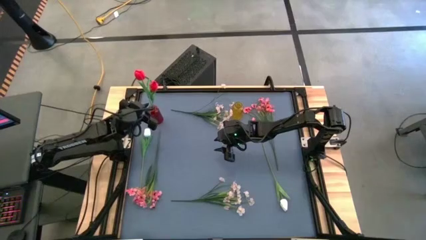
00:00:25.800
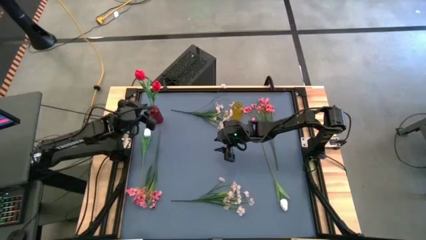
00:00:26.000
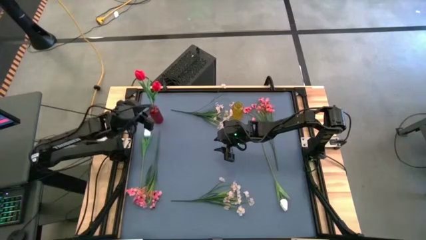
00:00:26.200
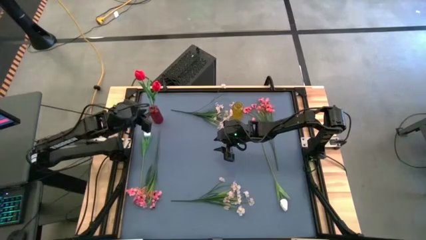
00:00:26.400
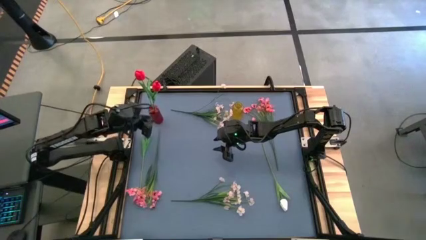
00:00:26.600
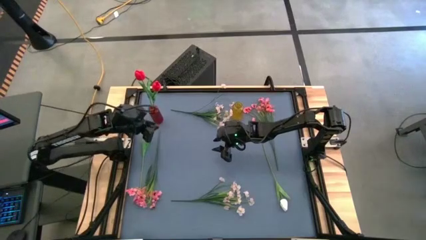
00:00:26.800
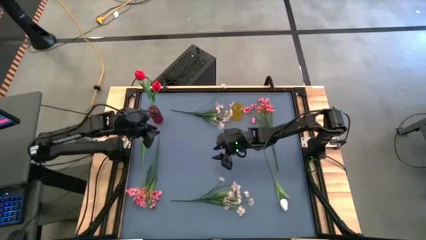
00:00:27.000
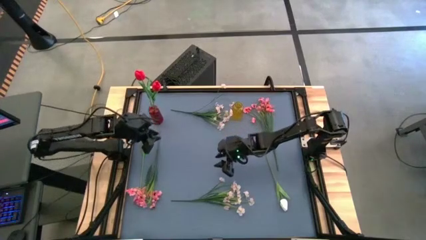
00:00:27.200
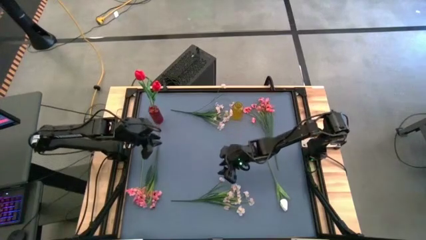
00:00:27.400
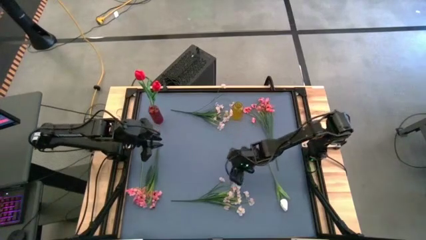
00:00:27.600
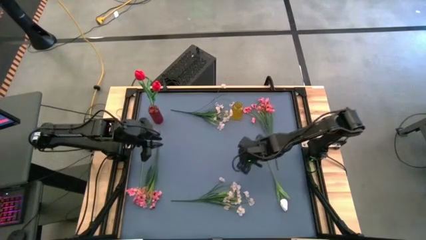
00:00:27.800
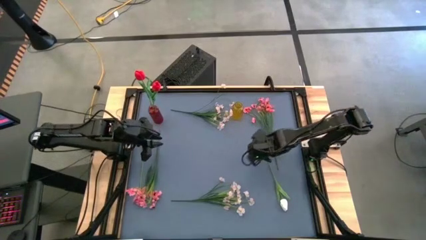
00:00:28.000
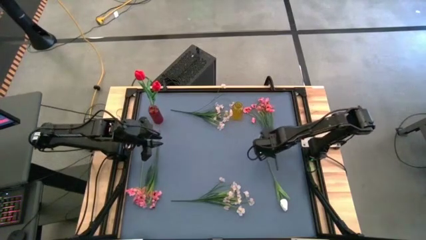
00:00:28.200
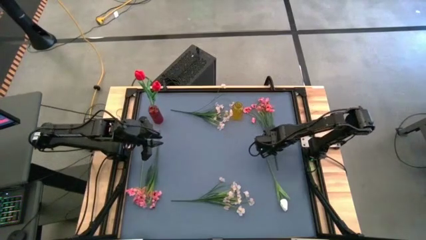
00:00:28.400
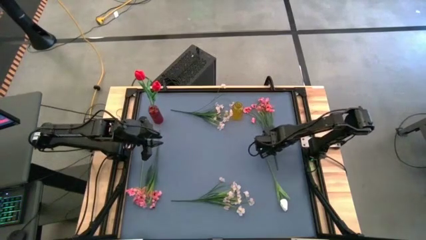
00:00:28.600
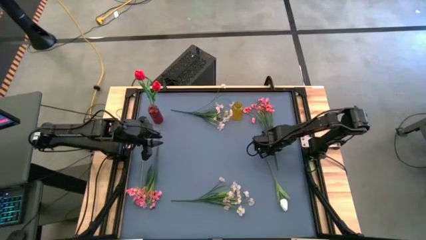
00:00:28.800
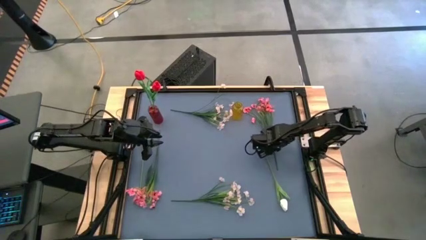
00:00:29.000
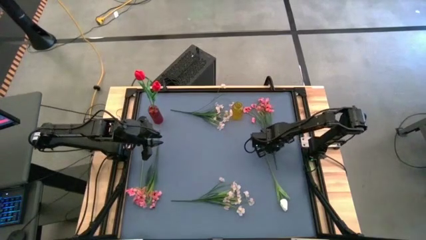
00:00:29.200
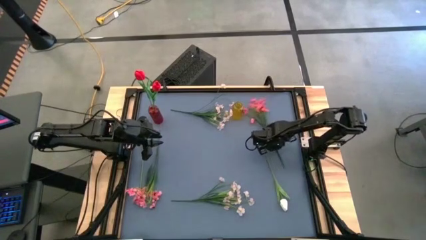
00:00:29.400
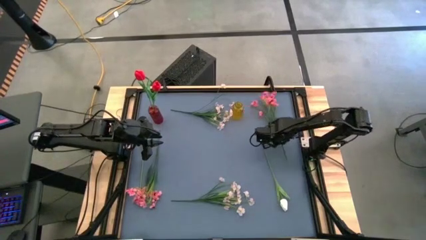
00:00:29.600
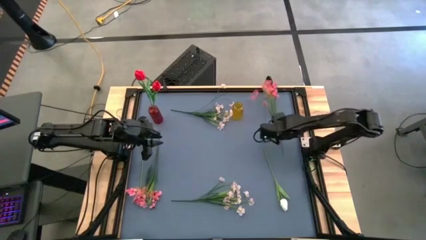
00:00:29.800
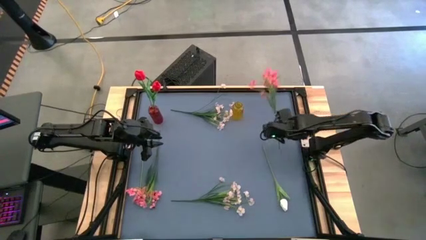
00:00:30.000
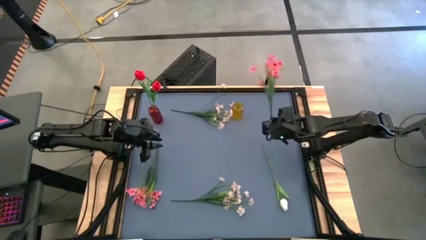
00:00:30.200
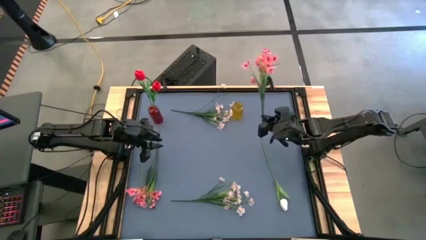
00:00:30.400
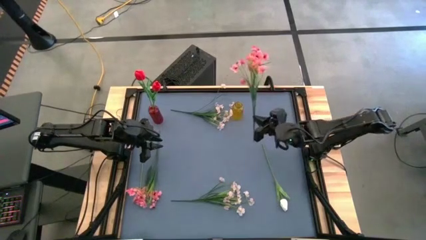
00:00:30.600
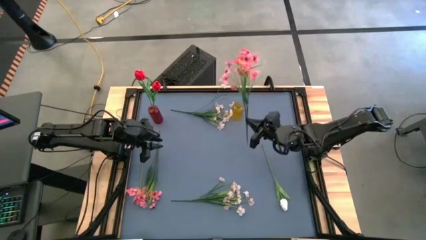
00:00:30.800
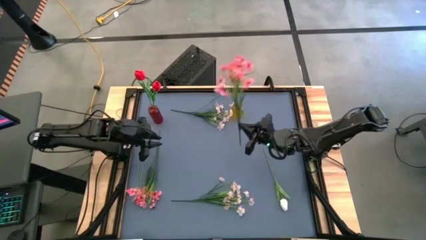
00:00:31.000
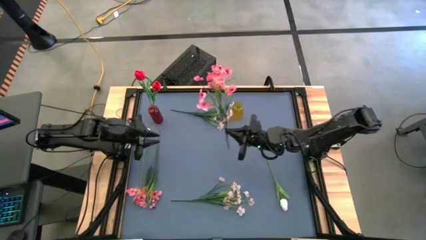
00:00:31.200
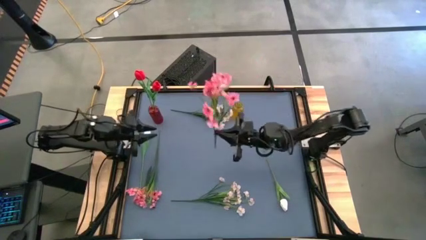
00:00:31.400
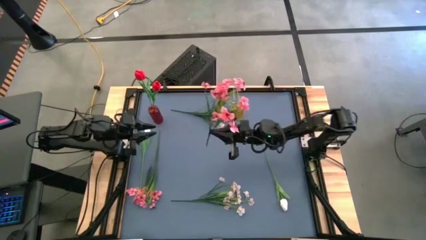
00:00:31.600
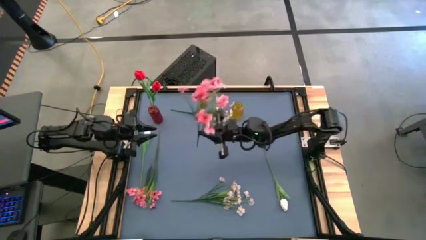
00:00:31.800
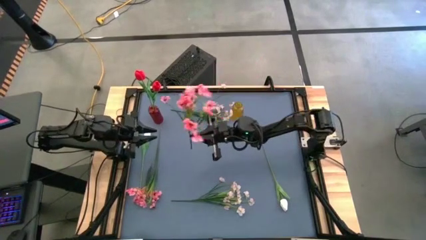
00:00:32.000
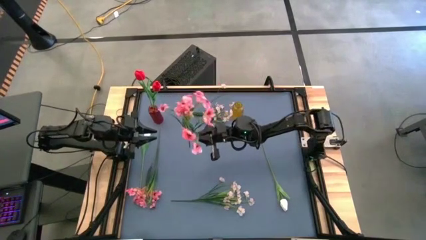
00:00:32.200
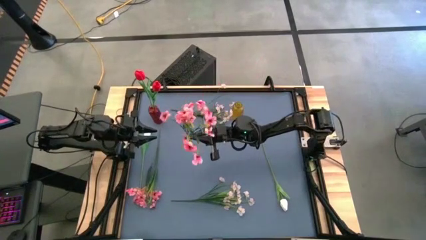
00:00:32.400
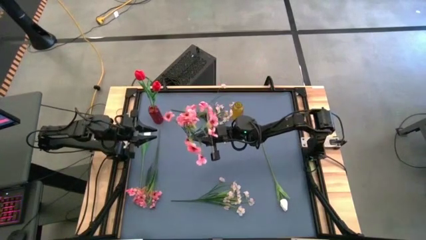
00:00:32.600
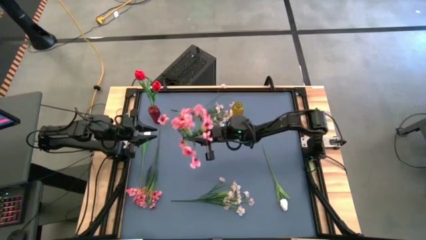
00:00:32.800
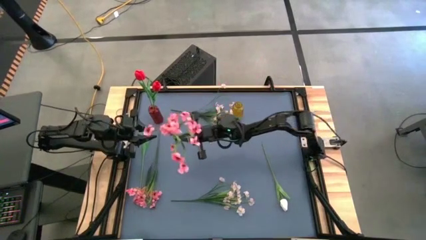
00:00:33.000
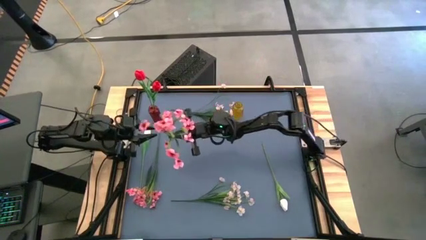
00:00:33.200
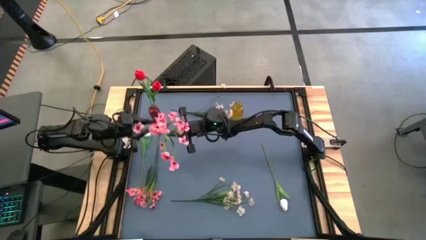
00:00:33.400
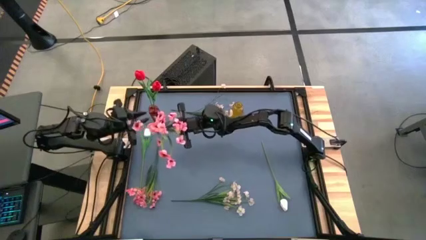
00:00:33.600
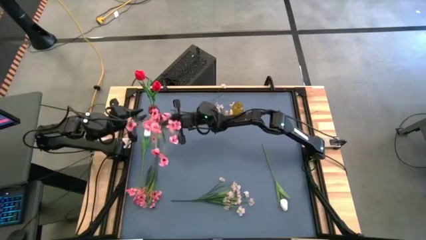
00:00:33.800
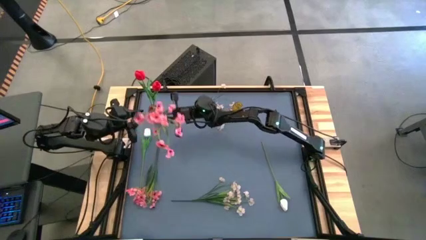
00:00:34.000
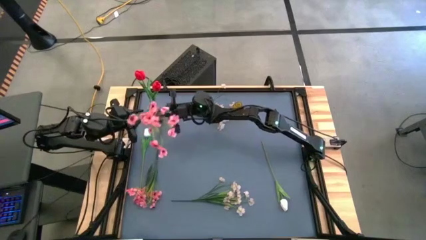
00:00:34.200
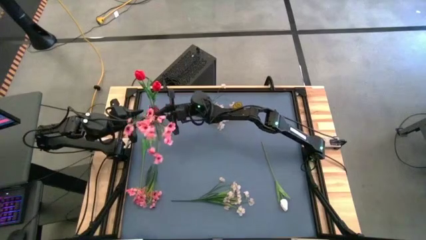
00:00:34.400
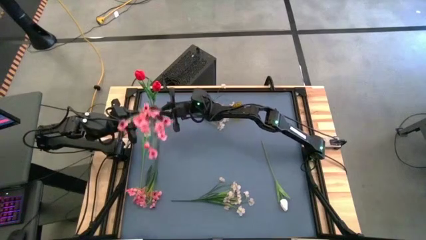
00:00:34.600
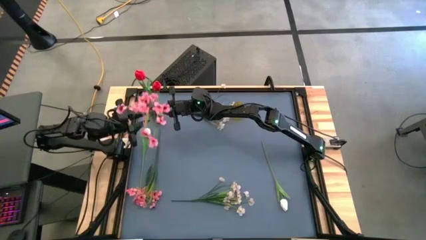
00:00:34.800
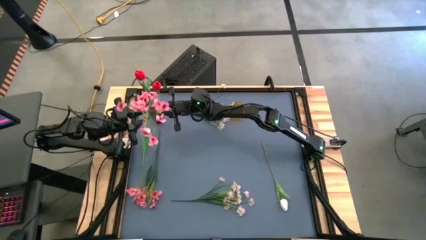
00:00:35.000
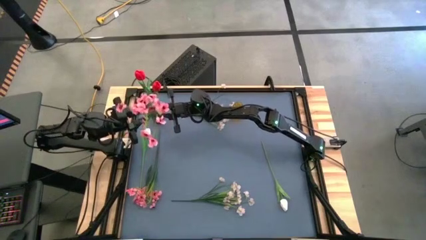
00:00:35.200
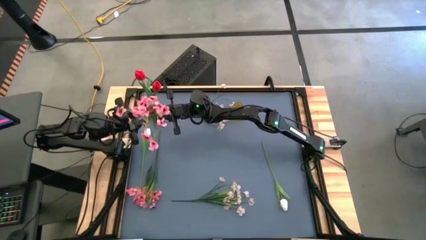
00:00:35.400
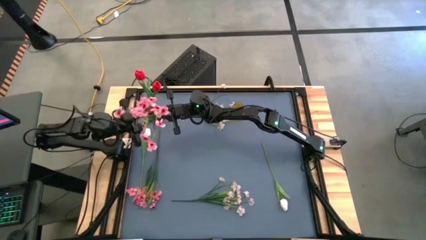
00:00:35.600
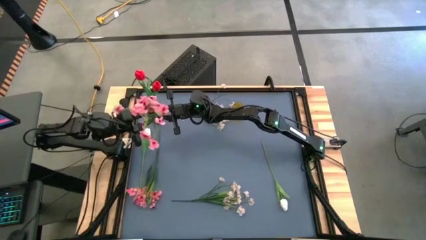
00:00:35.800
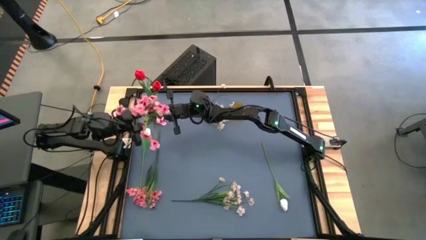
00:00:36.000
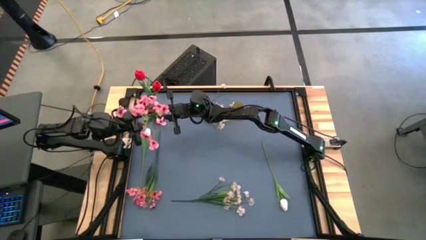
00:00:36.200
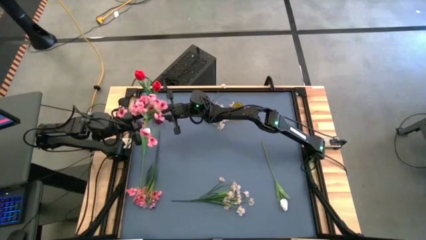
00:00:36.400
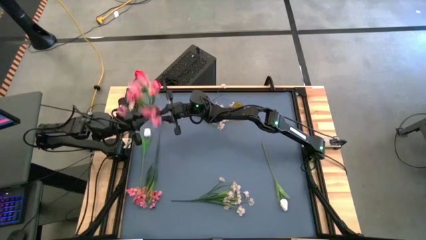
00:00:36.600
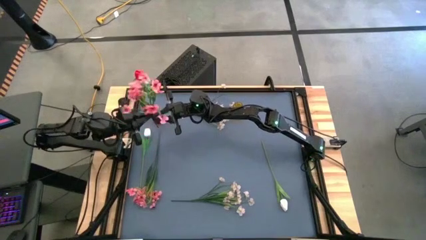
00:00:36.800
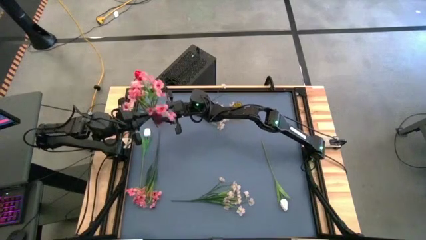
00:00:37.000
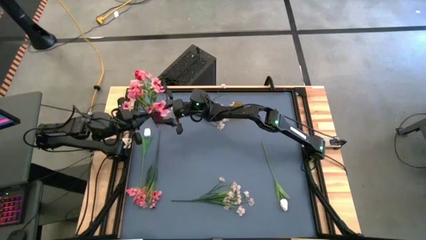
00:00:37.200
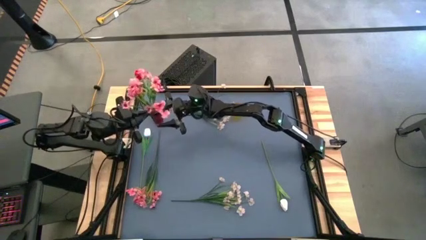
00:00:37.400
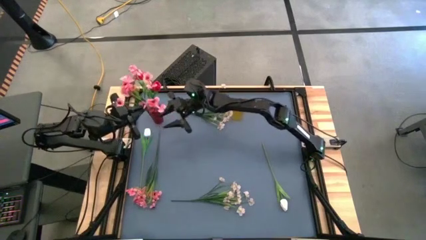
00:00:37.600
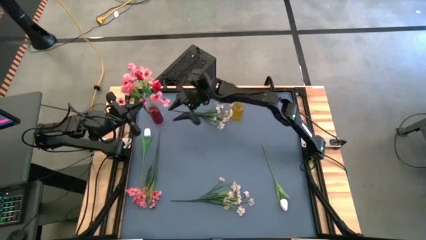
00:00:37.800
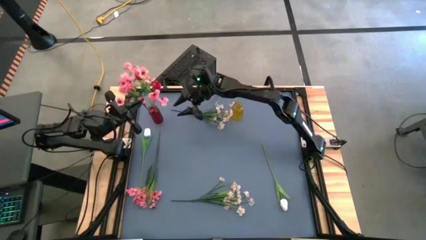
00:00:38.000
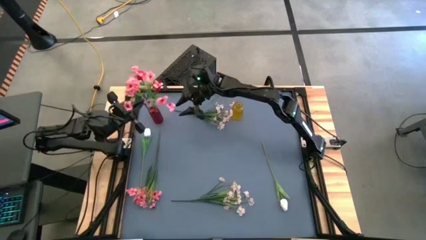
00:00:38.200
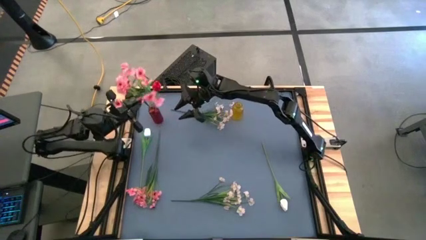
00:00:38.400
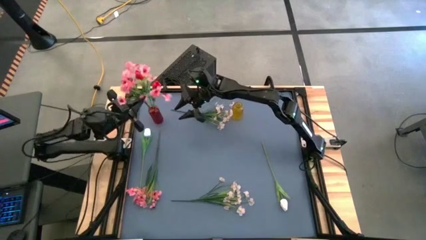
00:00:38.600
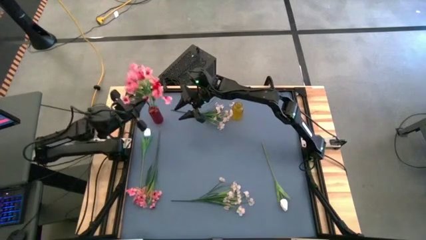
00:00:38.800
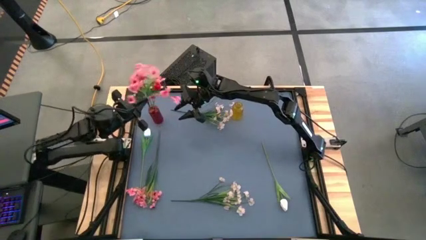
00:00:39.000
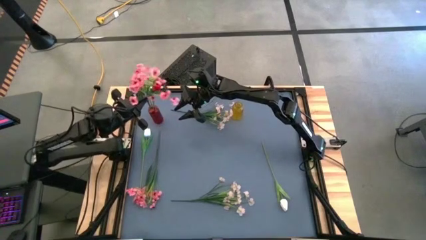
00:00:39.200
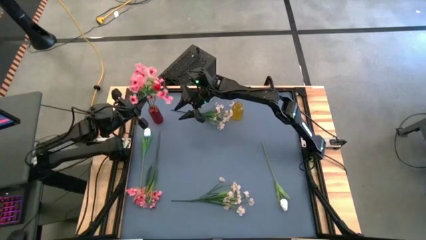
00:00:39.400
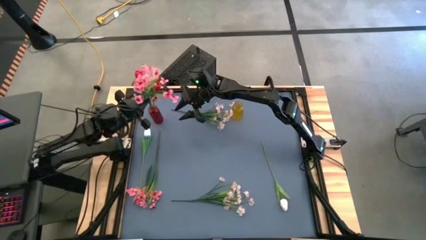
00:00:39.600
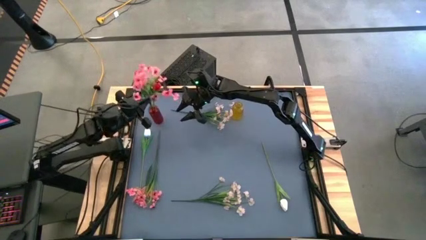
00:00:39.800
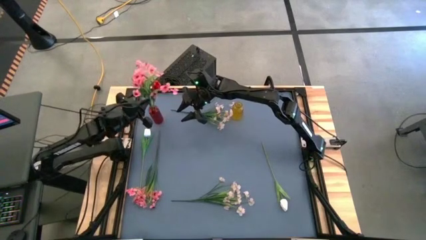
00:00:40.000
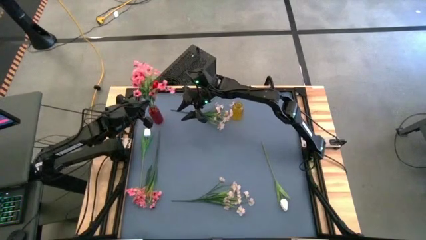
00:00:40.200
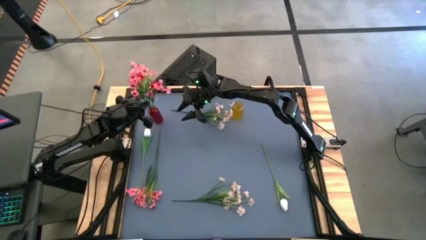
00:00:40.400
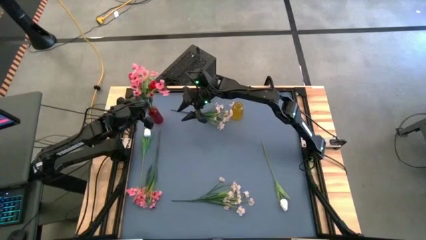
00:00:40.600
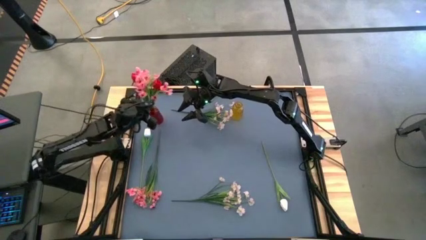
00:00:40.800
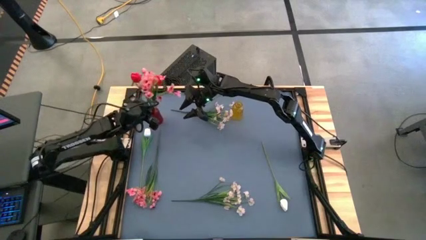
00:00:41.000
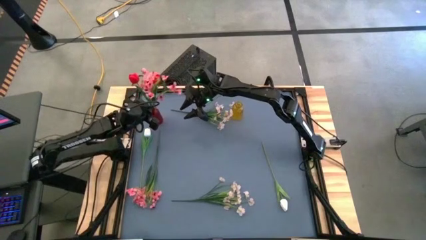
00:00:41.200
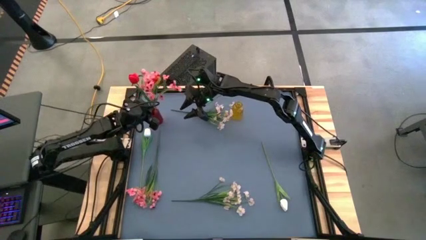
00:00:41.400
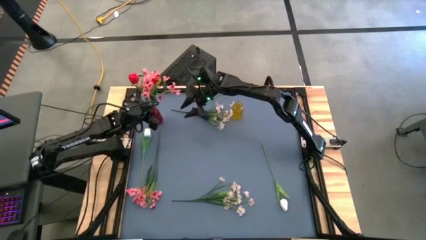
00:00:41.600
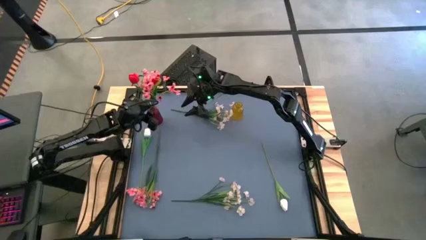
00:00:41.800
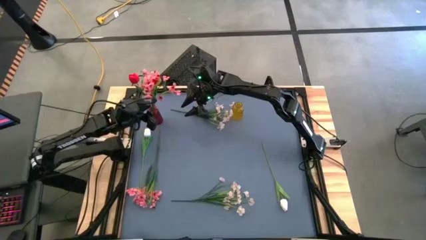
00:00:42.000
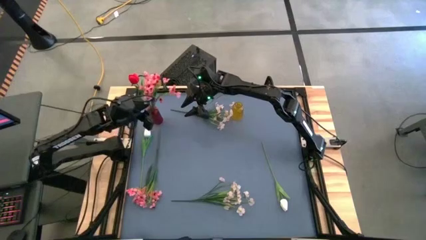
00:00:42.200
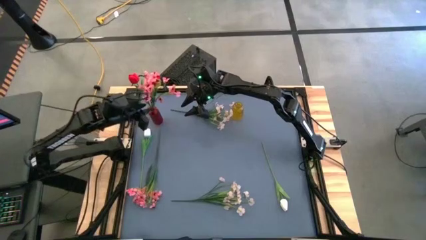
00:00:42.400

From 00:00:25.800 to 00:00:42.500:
Task: Sort flowers into vase by color
Put the top pink flowers into the red vase
